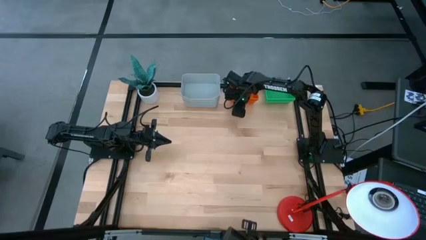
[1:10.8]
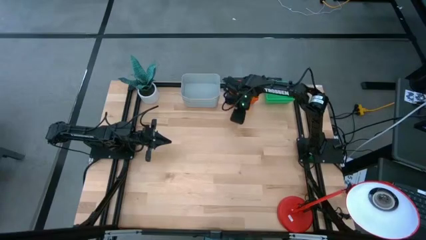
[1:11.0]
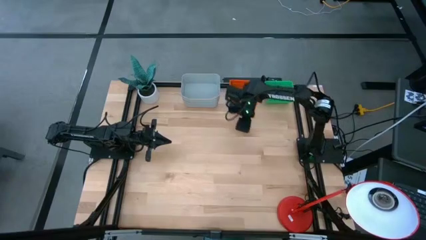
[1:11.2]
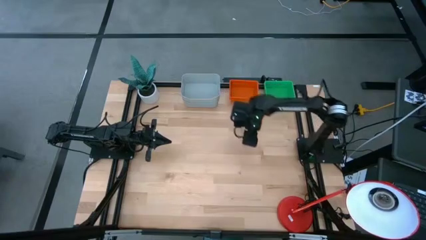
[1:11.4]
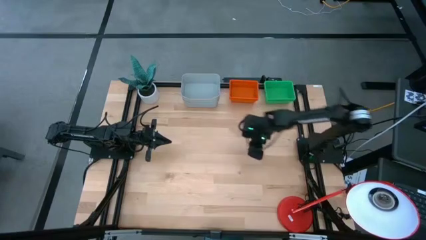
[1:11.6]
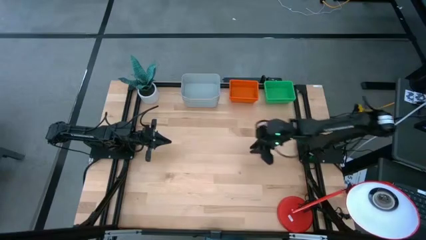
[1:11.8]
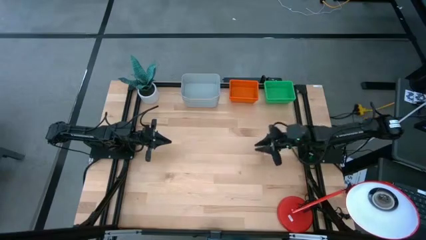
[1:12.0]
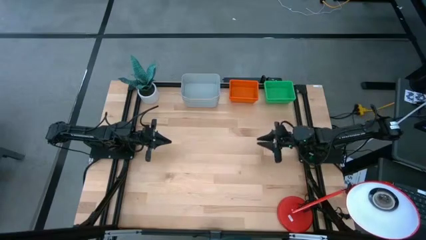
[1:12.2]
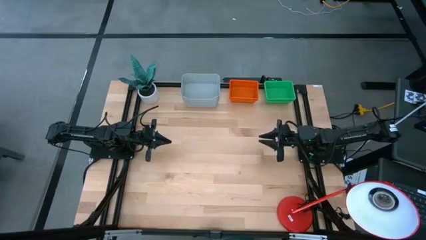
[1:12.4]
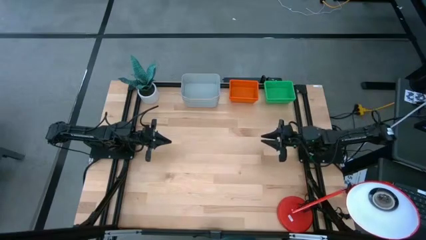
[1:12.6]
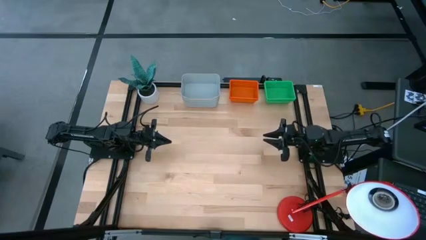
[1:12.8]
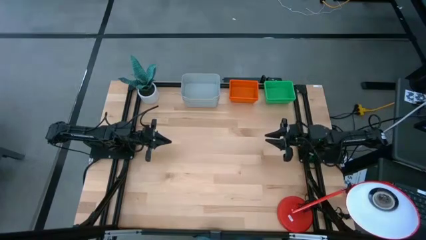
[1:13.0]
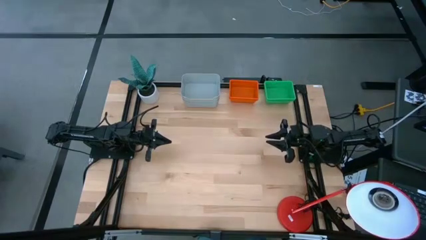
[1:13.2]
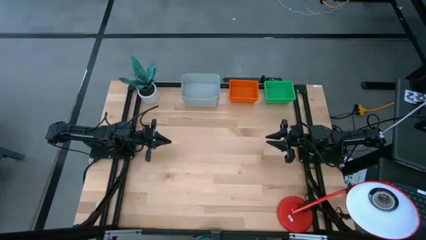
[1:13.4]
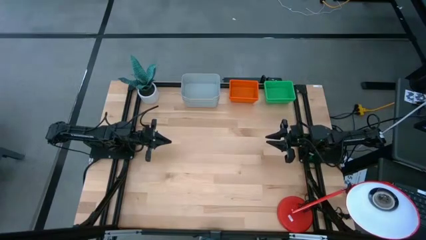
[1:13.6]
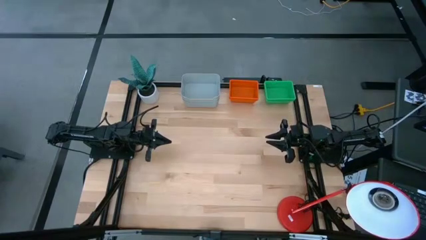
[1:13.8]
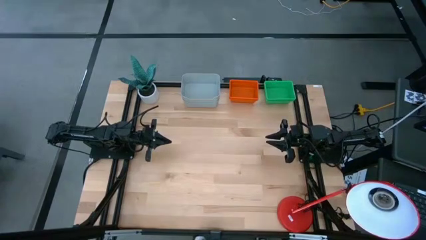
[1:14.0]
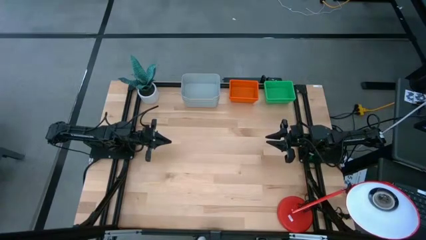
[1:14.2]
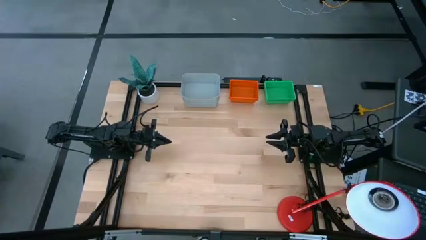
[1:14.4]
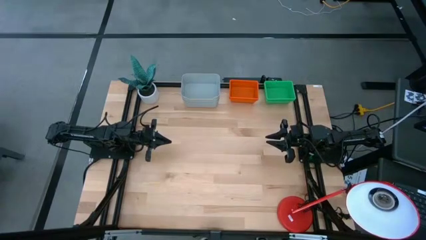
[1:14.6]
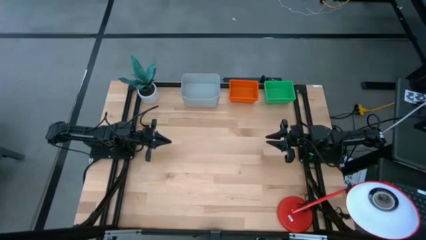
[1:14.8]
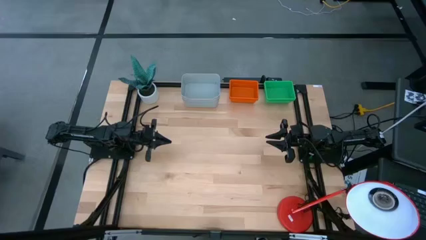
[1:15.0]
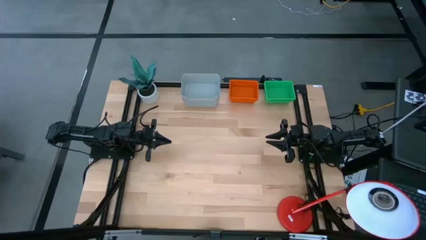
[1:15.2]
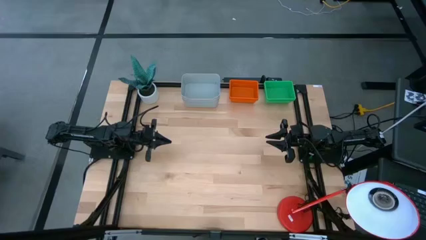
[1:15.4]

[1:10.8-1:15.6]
Return to Home Position

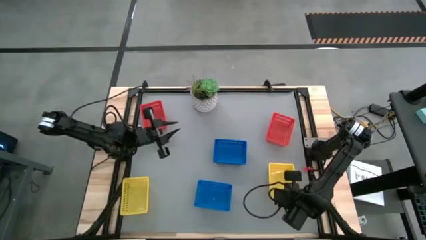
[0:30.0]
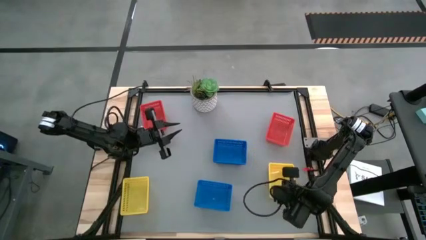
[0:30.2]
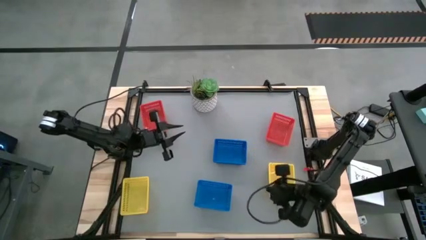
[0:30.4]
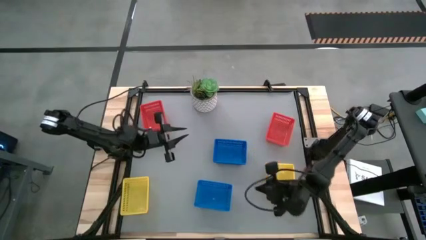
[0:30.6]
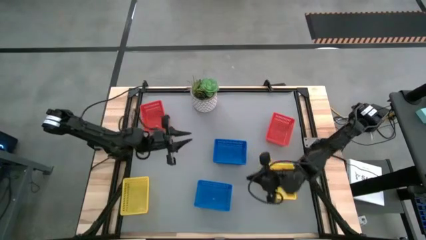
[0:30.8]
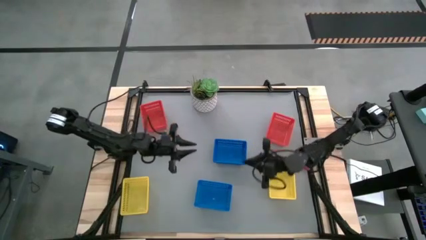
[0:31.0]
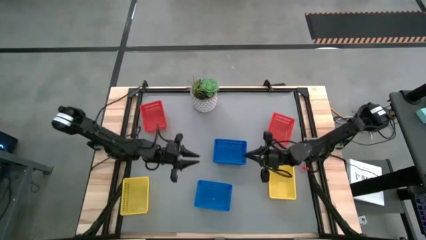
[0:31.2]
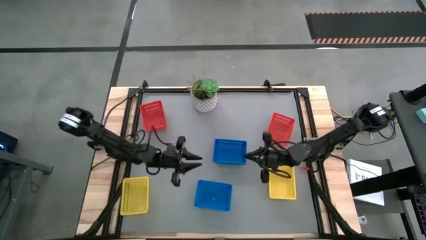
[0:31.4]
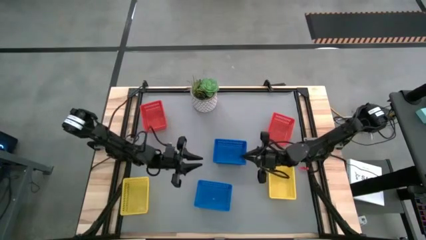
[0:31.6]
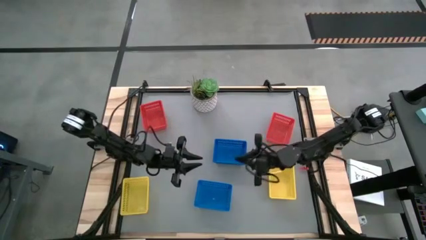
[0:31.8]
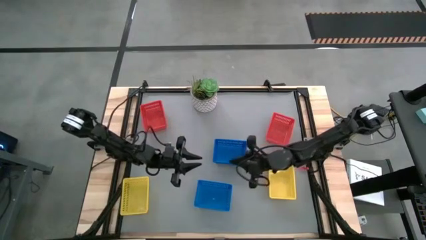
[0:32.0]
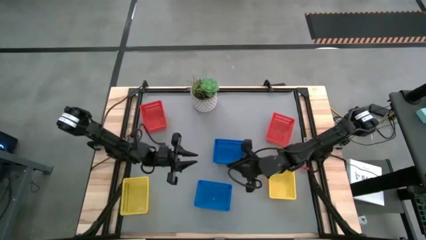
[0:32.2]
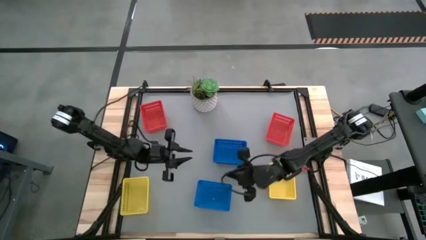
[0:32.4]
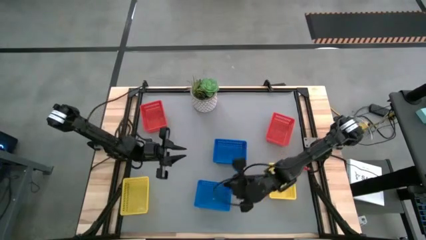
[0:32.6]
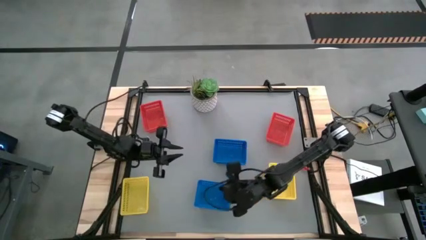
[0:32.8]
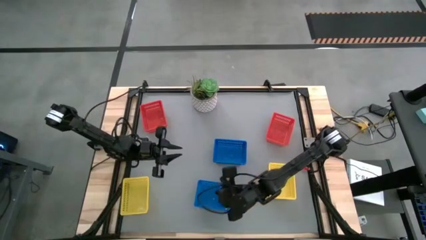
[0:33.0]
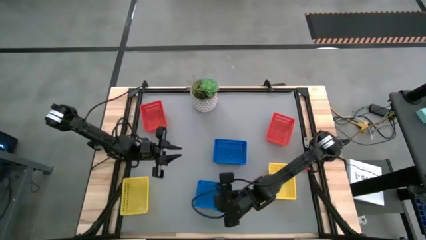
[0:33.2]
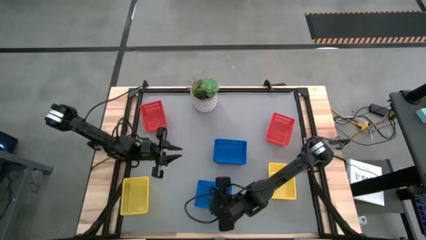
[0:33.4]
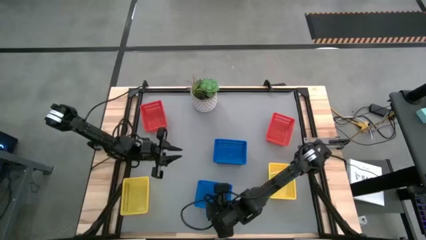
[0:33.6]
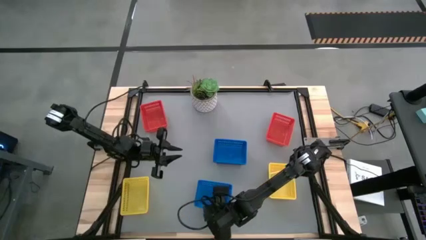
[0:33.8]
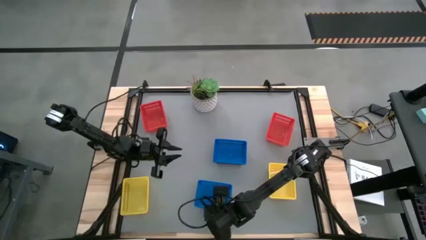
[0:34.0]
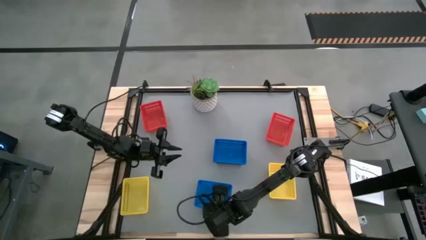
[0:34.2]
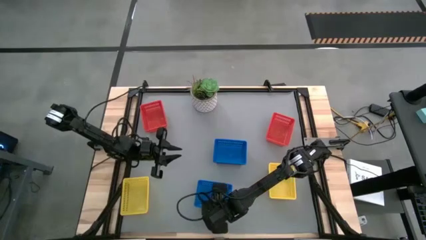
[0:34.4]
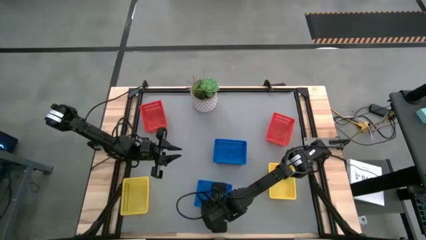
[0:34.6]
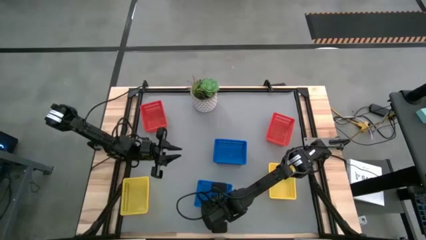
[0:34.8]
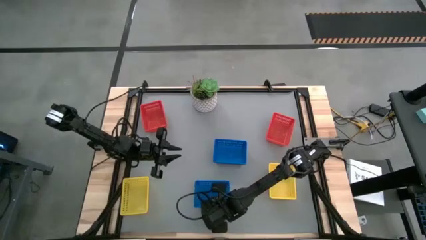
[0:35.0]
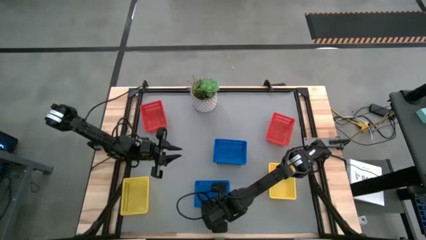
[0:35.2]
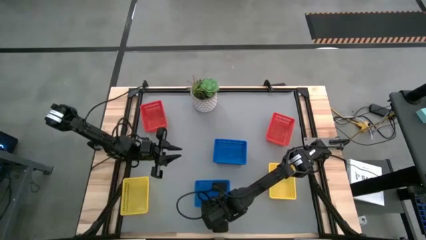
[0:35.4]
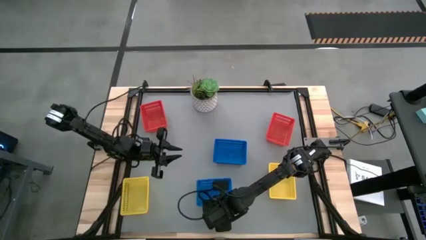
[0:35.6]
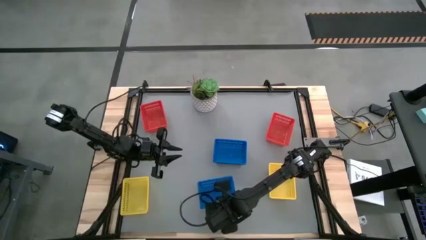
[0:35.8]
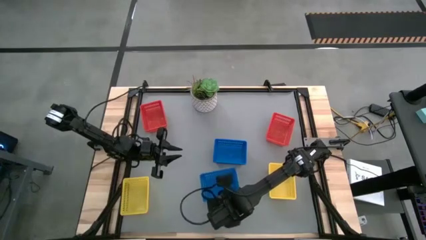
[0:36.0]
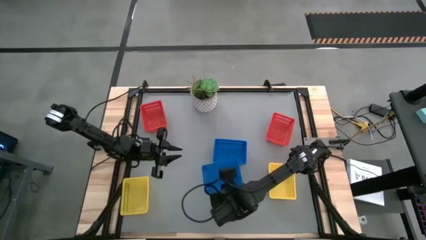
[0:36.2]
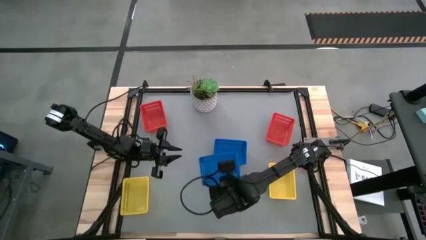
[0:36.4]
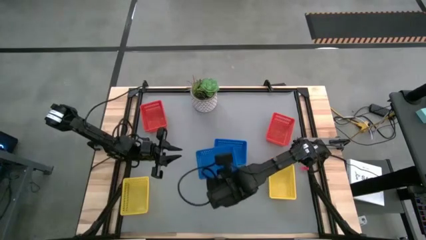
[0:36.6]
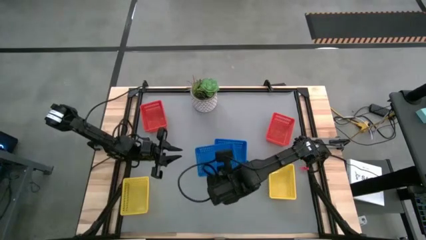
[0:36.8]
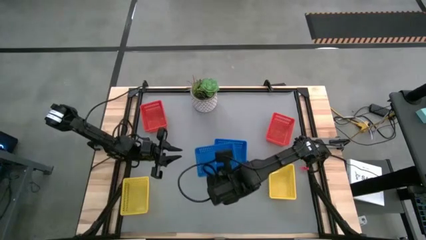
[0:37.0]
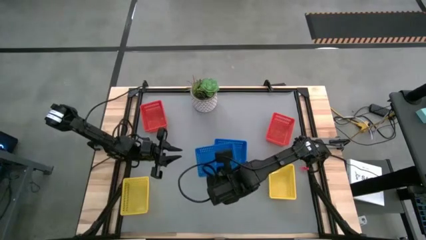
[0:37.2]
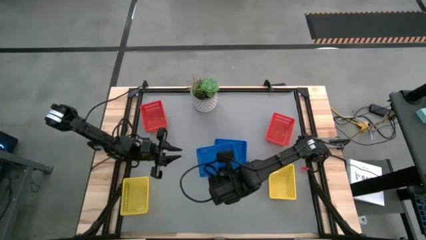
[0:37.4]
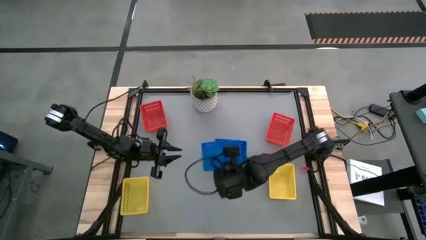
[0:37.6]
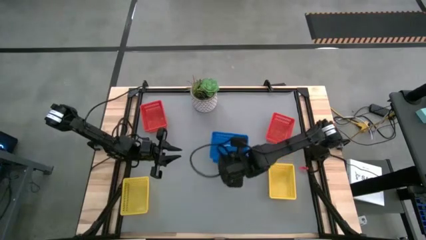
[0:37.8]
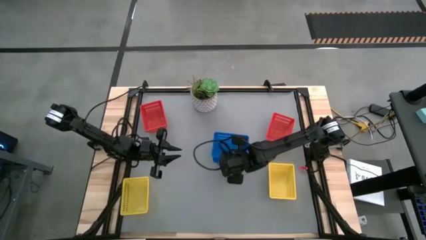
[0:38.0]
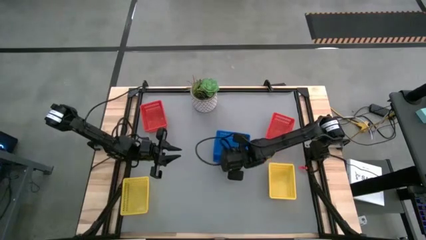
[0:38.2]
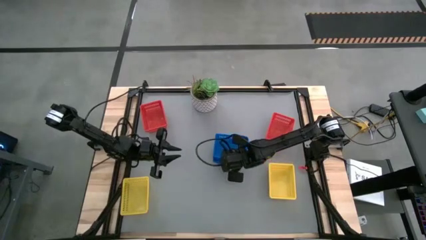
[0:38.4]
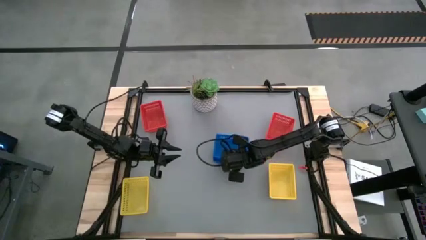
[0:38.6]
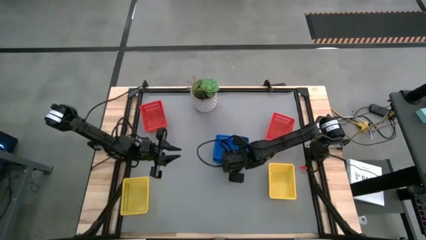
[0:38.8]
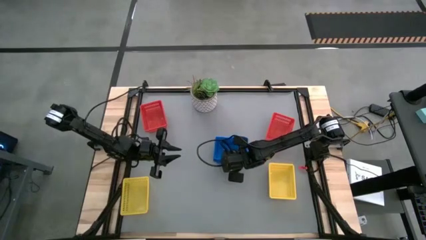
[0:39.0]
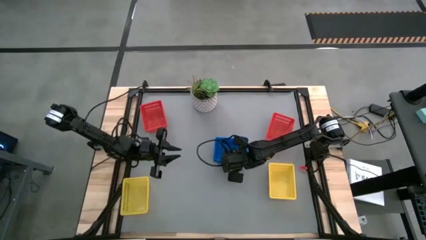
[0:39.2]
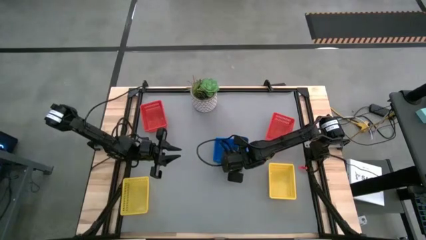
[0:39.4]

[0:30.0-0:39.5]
Stack the bottom blue basket on the blue baskets
